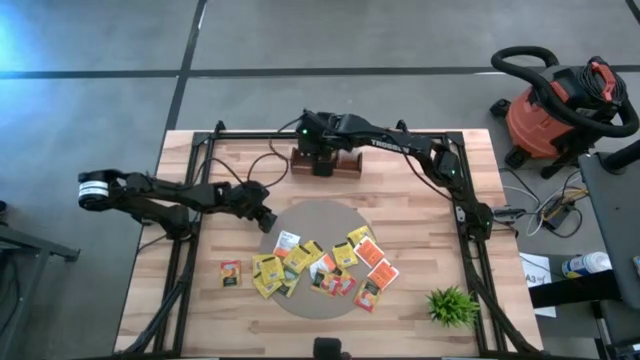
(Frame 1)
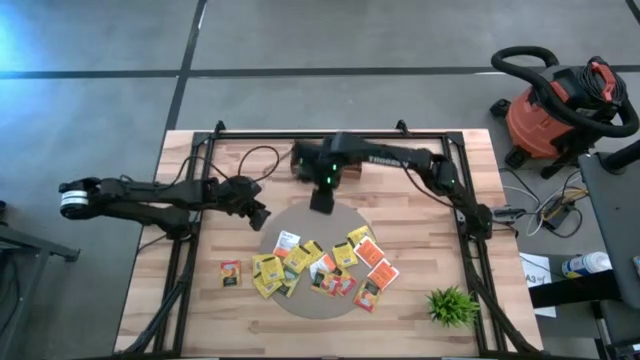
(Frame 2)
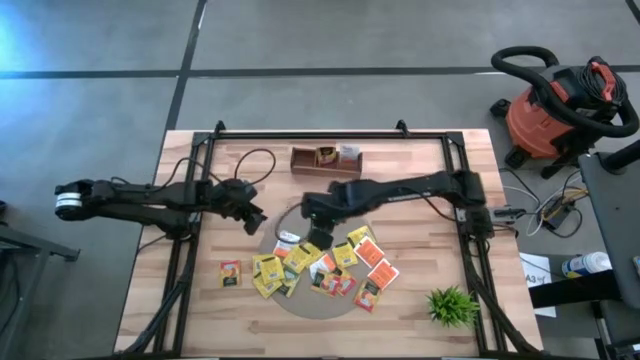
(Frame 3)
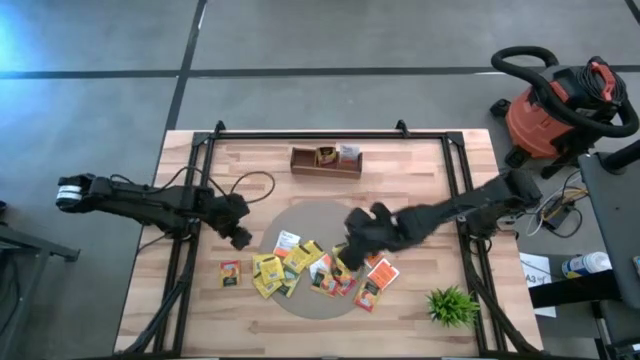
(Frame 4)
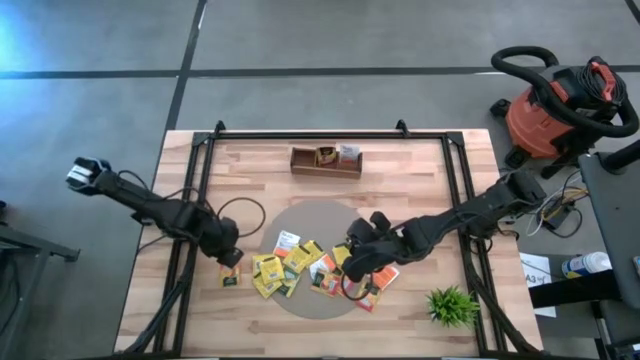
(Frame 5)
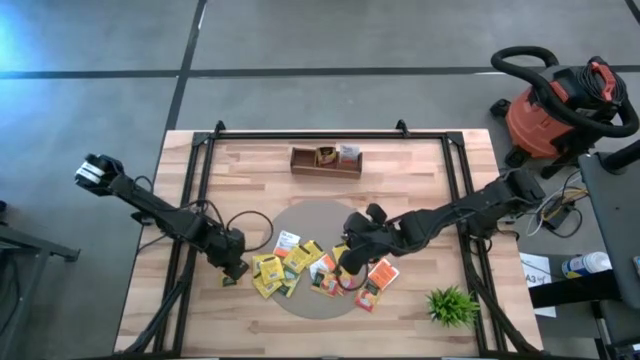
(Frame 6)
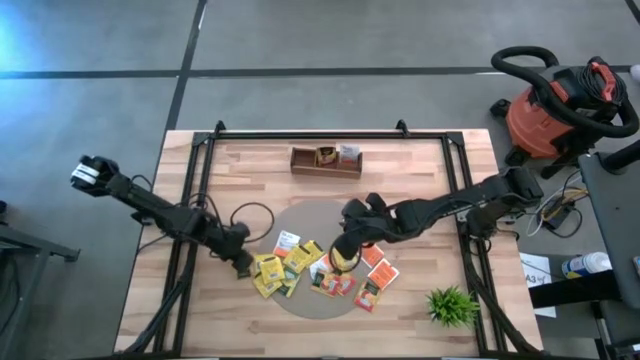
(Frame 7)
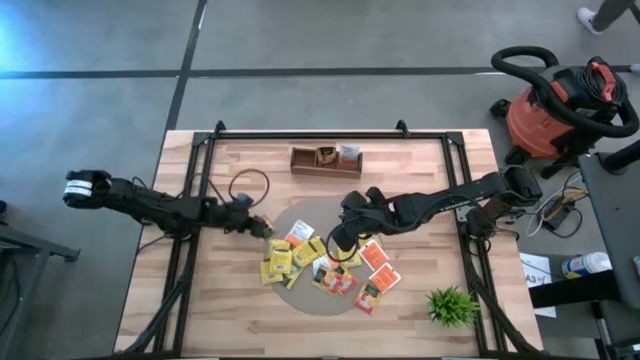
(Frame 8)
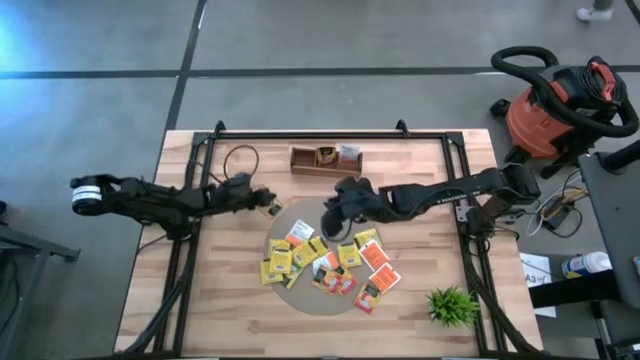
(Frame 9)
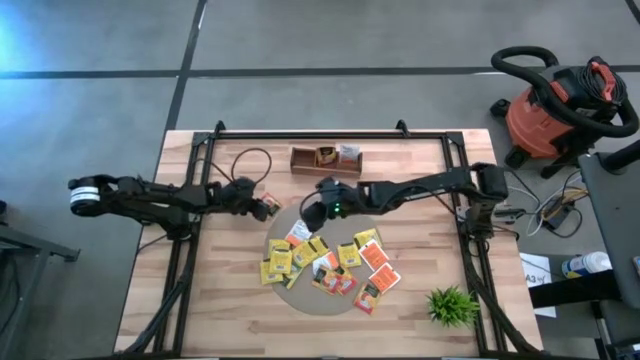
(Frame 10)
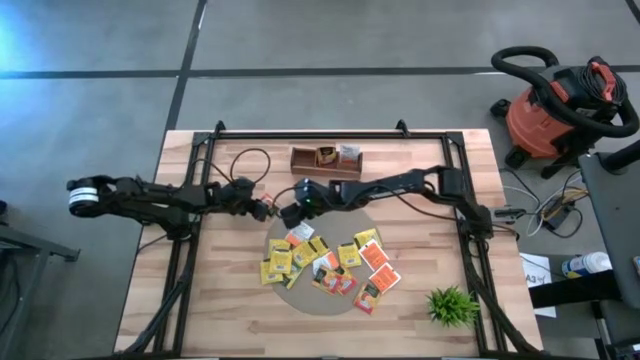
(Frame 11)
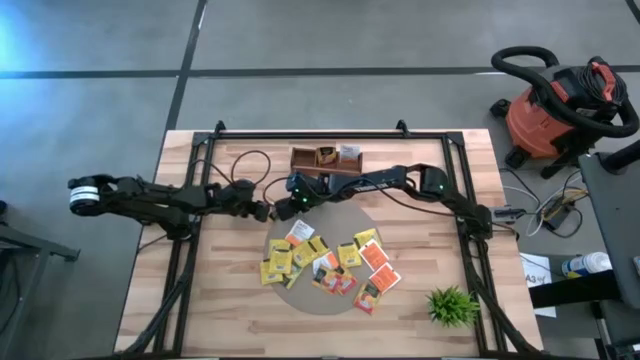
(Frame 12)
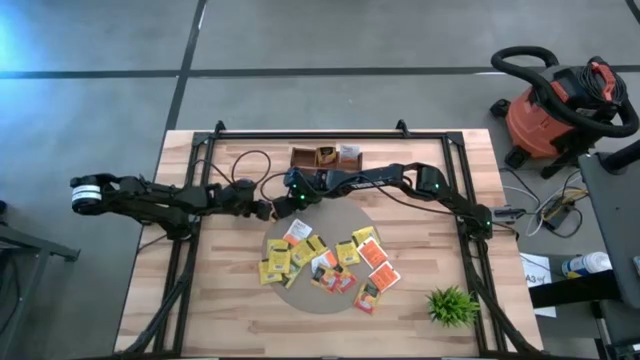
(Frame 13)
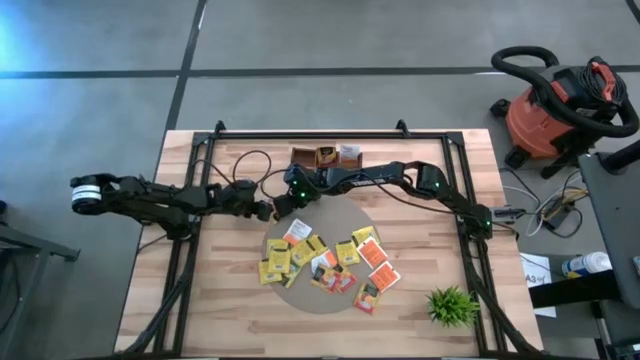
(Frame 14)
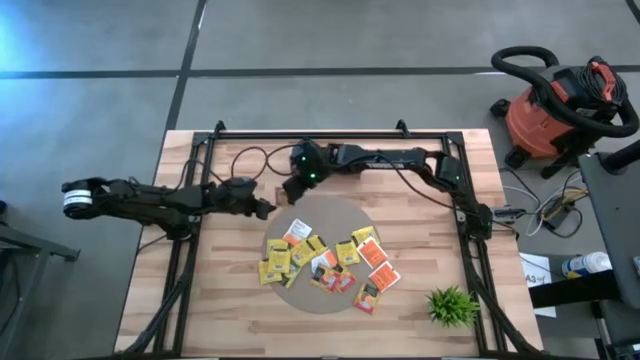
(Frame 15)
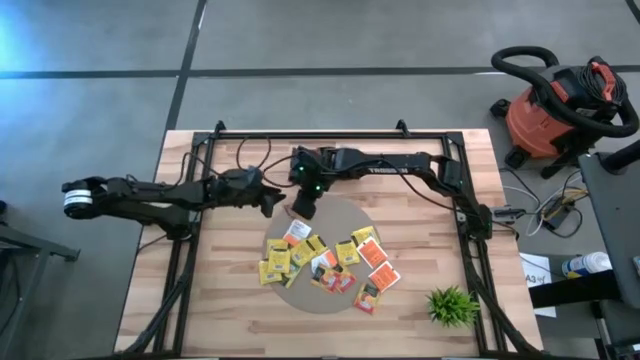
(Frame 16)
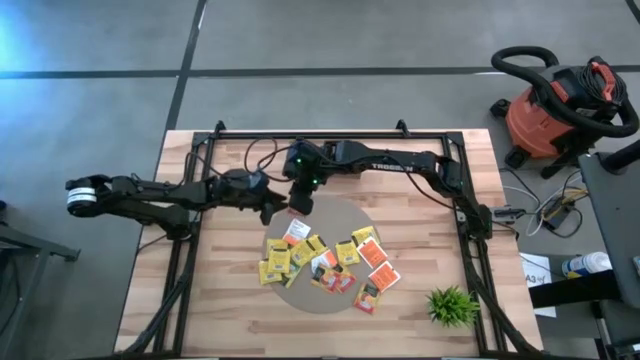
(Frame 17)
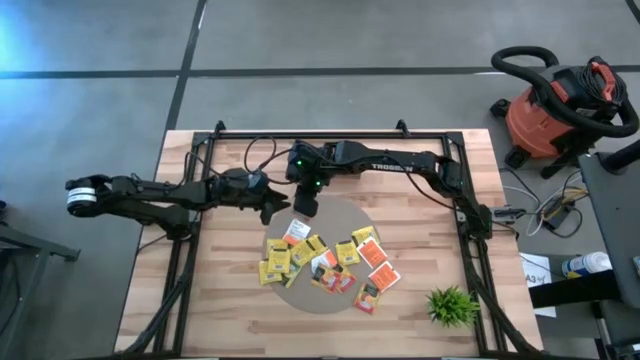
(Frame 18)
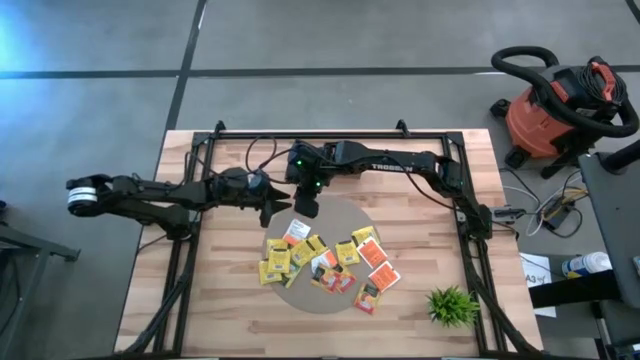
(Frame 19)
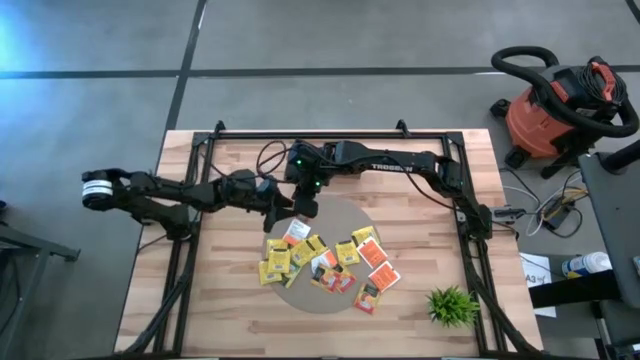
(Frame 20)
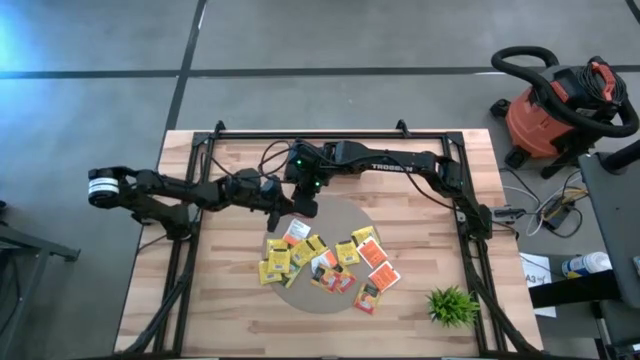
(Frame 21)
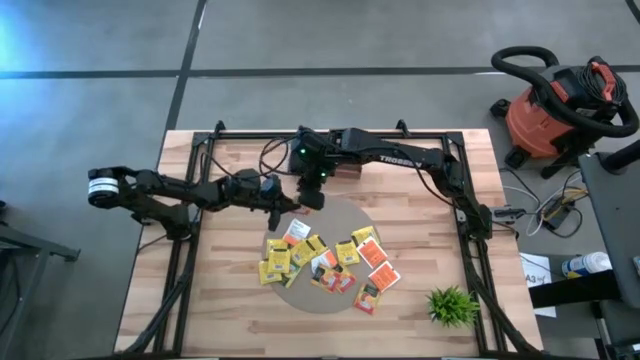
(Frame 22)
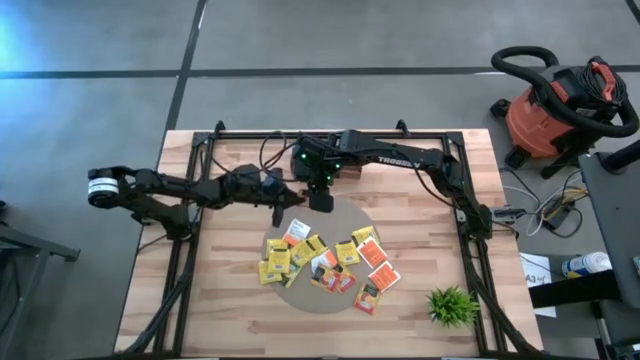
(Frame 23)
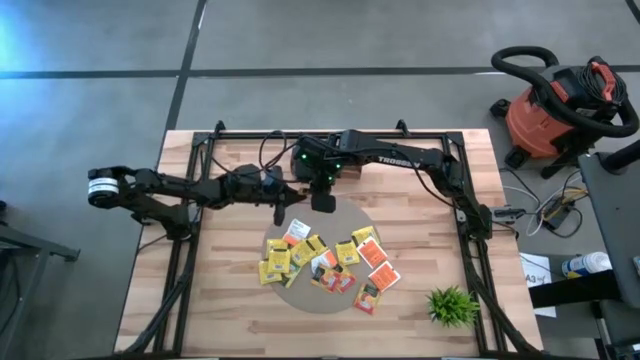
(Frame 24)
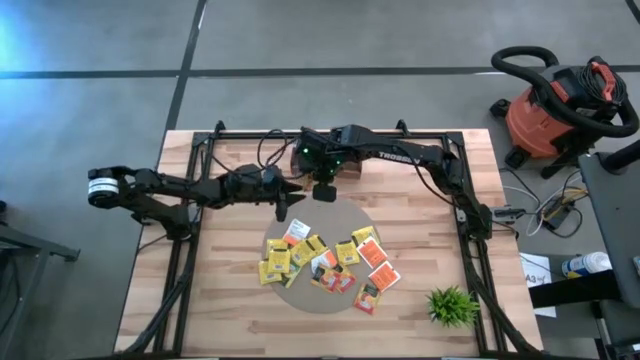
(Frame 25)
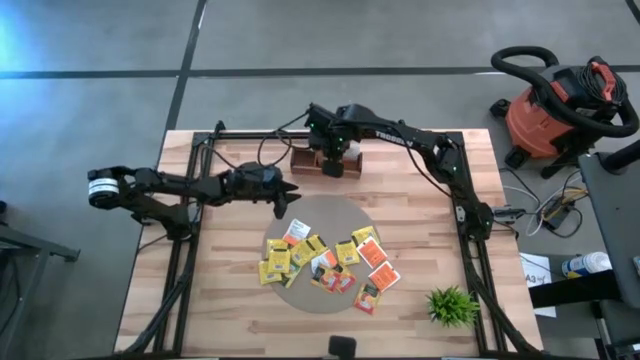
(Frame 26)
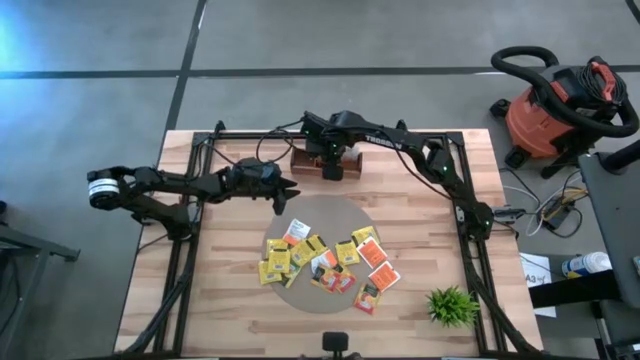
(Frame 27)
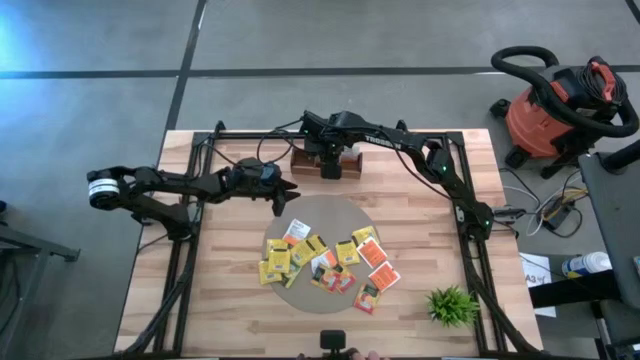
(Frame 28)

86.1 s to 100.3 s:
Task: Pick & Place Tea
Put the orange tea bag into the middle compartment of the wooden organizer

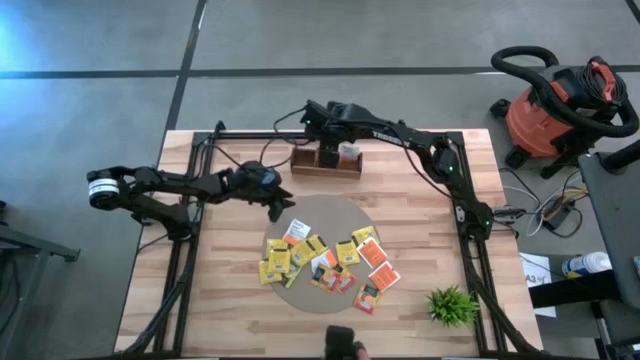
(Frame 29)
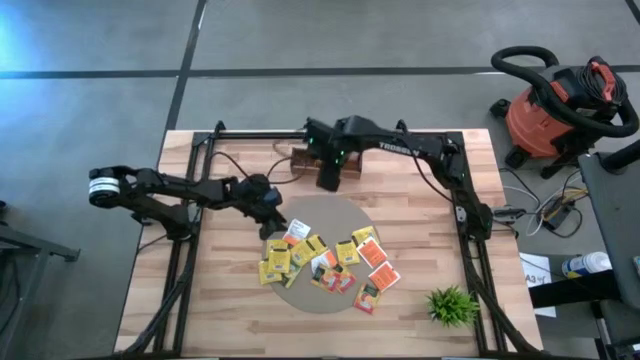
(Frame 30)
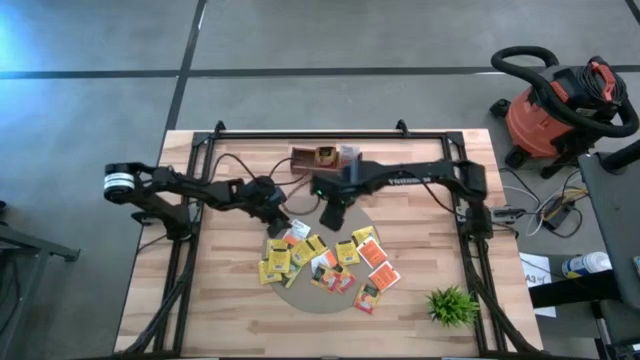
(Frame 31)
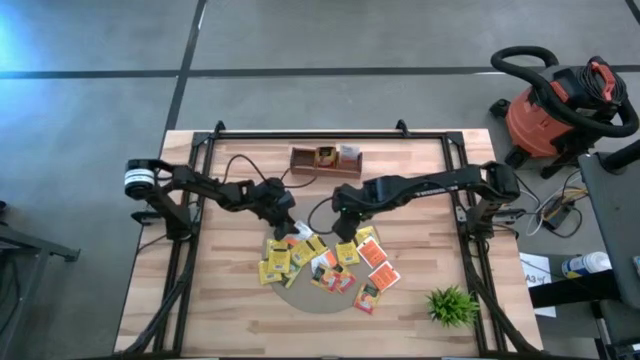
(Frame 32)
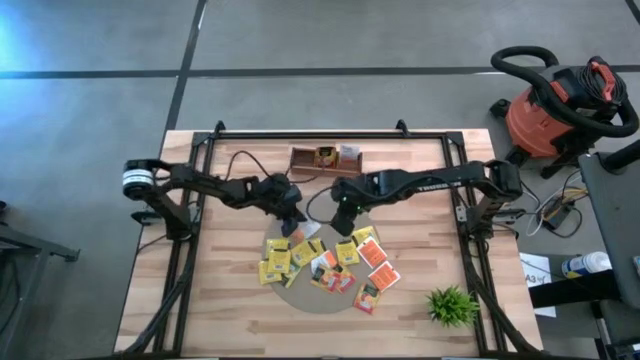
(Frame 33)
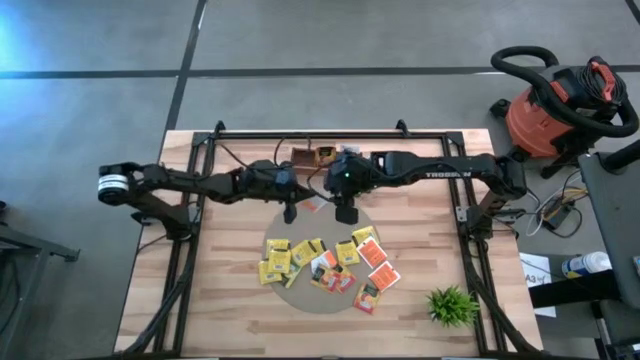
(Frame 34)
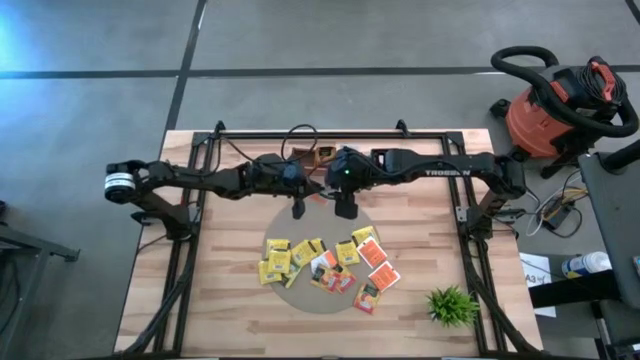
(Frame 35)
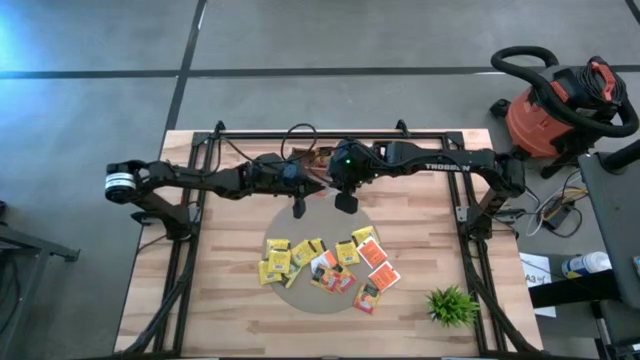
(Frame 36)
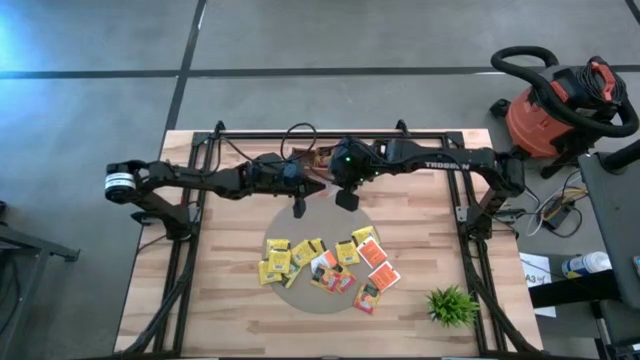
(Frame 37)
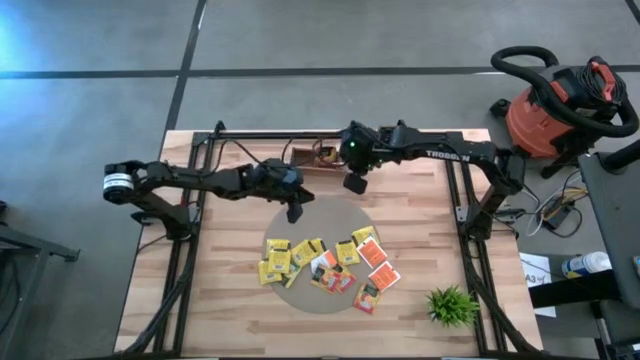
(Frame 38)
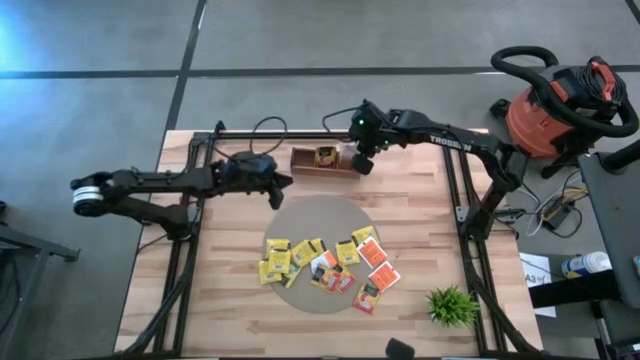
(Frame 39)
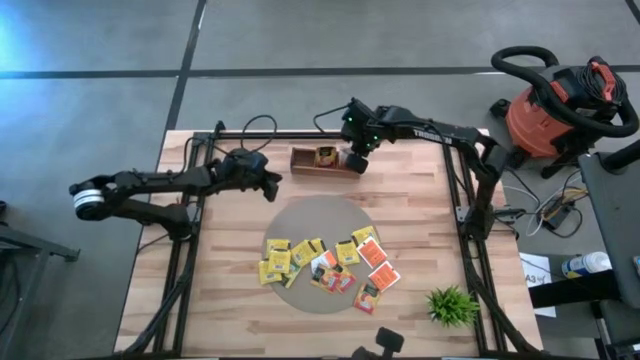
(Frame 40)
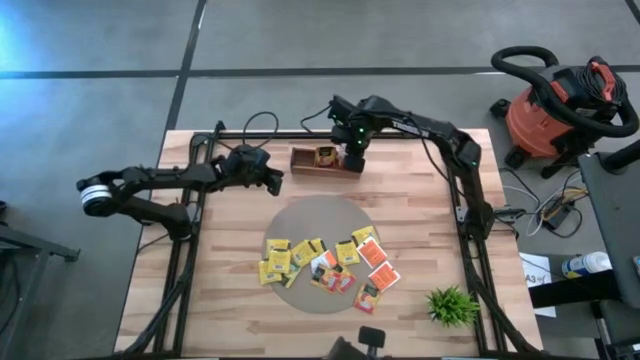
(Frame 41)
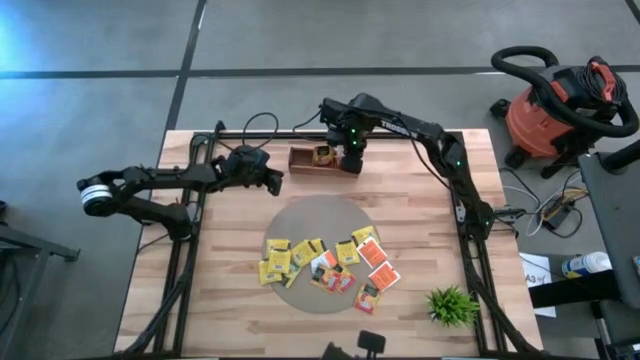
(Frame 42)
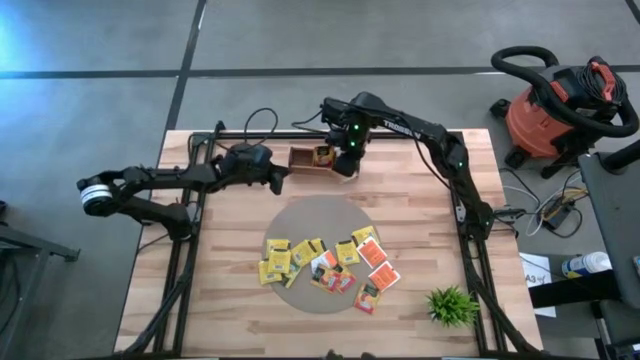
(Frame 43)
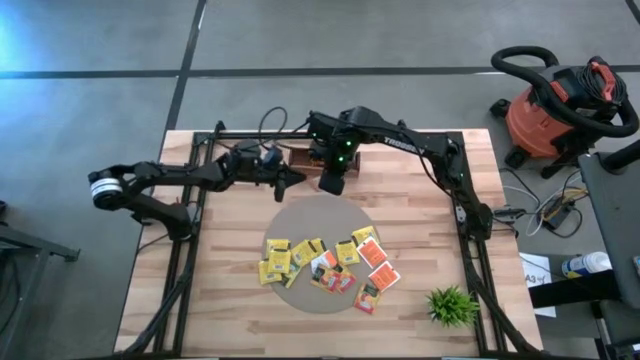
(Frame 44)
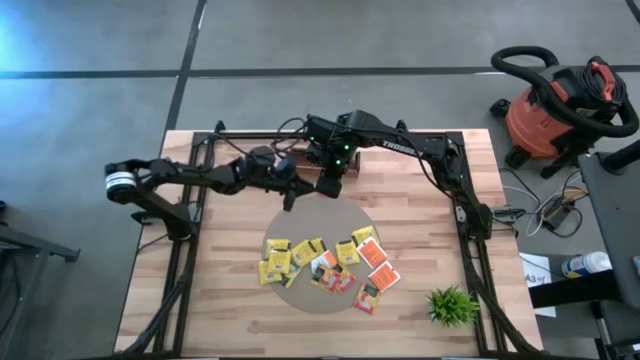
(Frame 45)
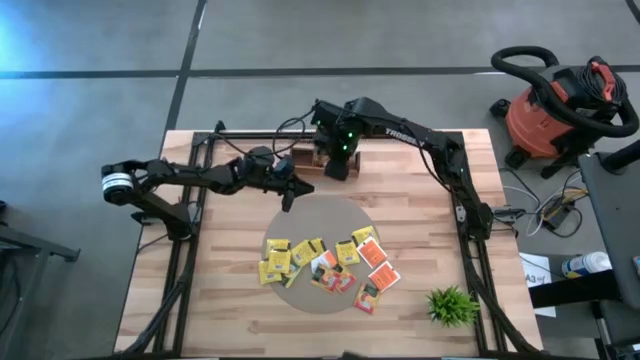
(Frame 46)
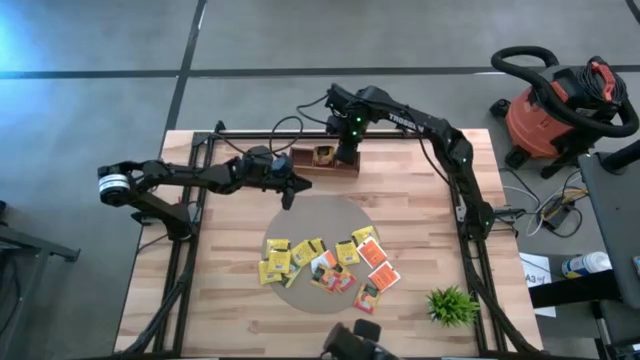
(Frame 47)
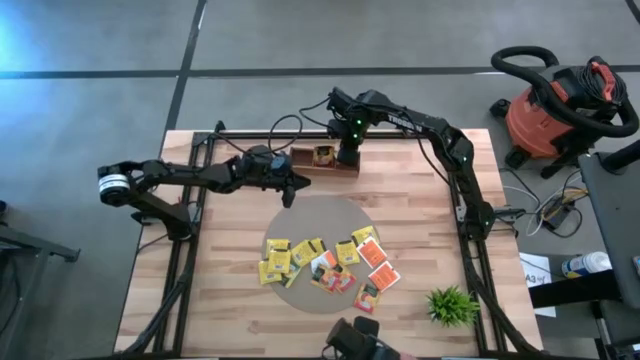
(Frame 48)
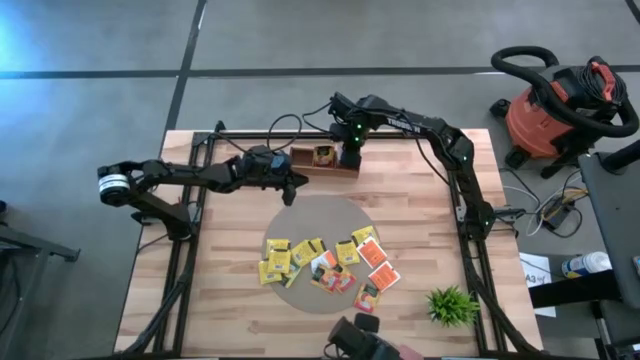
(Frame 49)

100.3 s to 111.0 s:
Put the white tea bag into the right compartment of the wooden organizer
